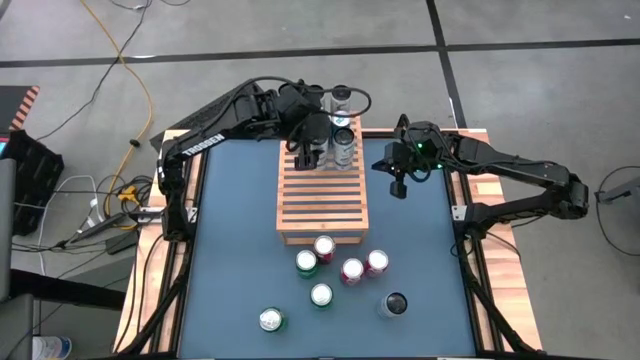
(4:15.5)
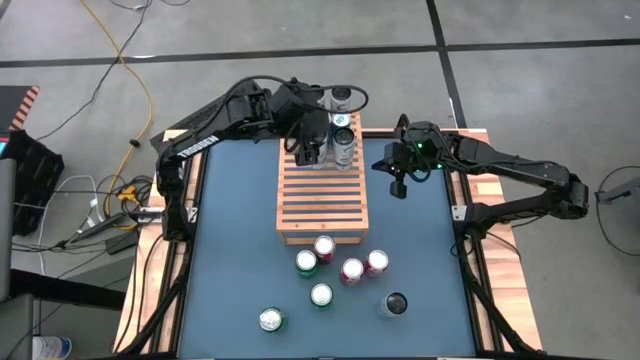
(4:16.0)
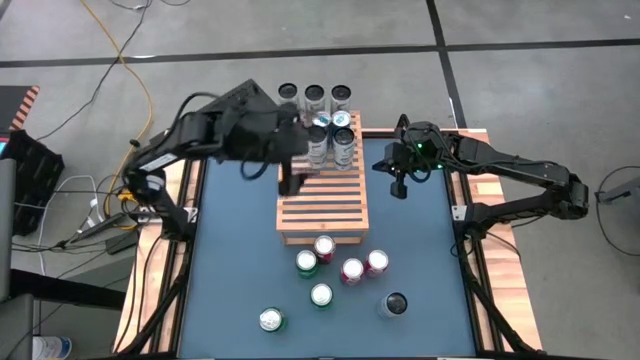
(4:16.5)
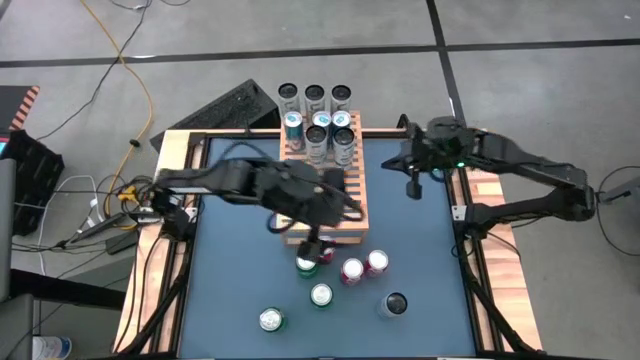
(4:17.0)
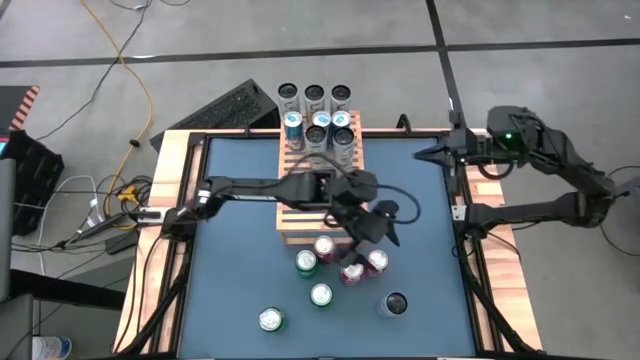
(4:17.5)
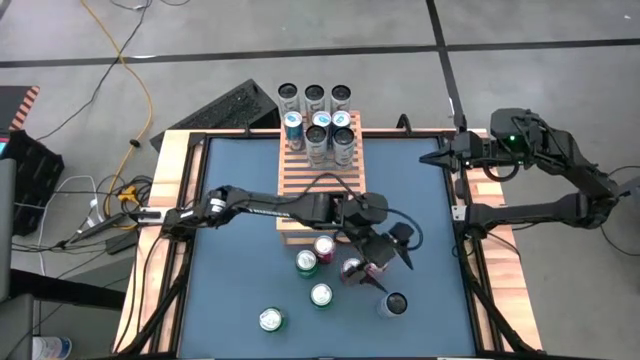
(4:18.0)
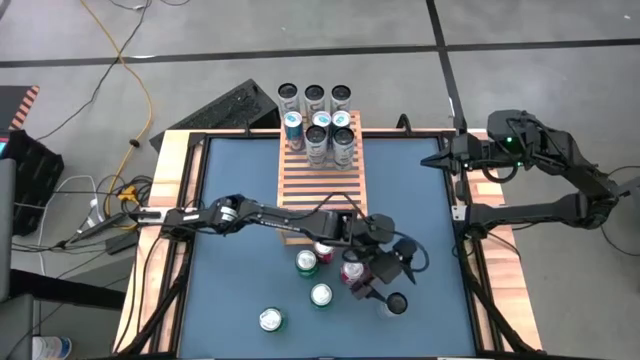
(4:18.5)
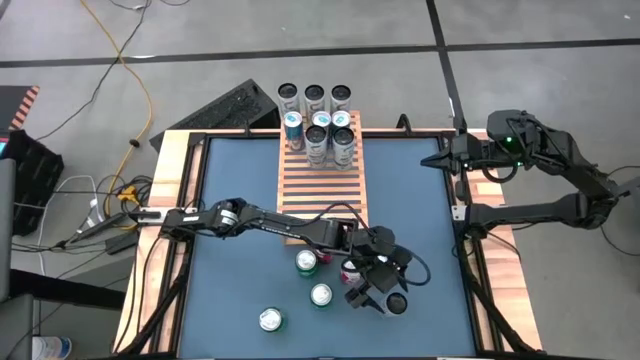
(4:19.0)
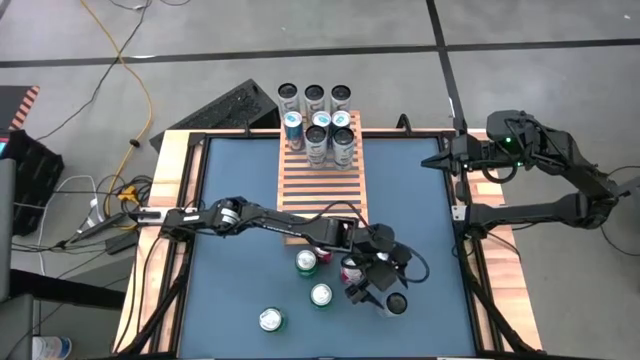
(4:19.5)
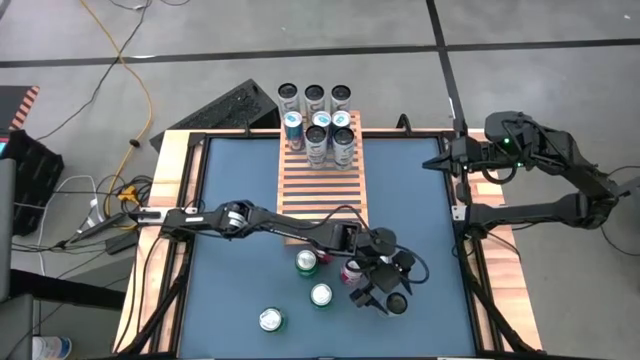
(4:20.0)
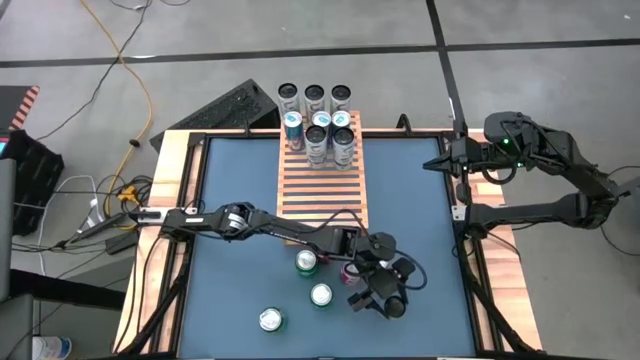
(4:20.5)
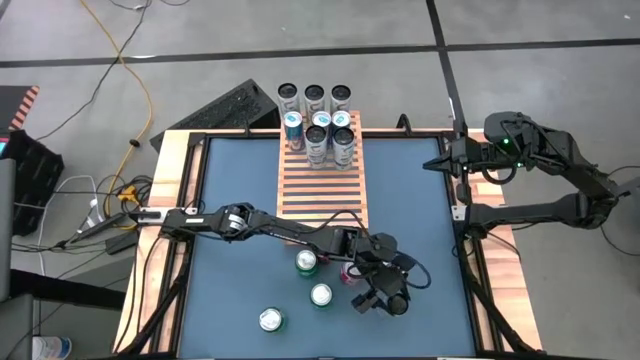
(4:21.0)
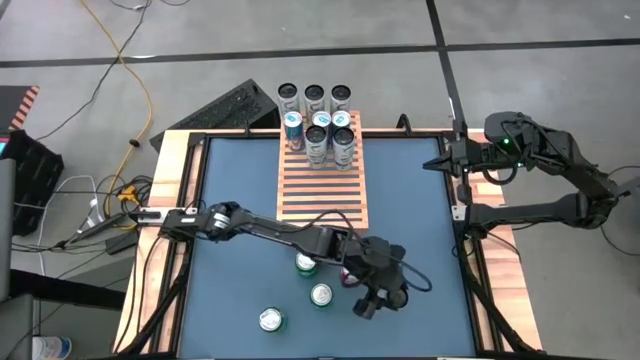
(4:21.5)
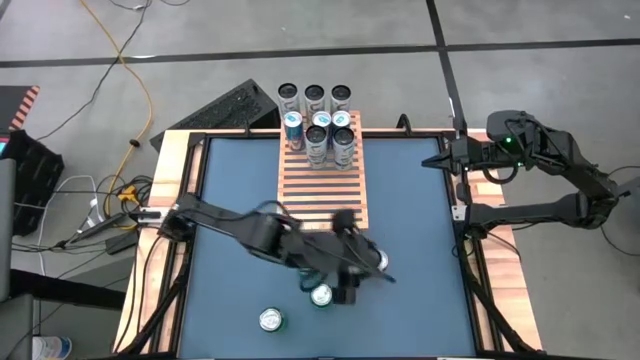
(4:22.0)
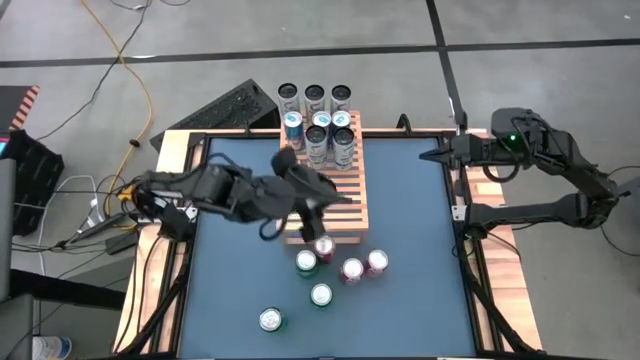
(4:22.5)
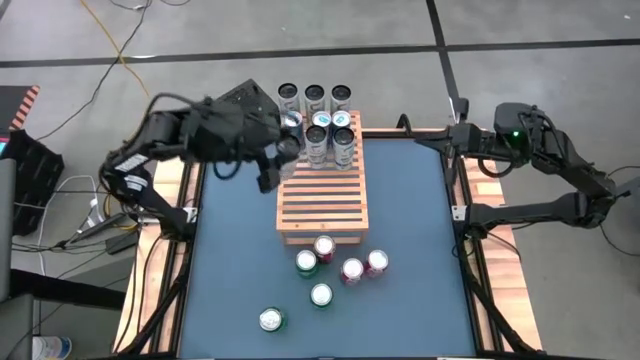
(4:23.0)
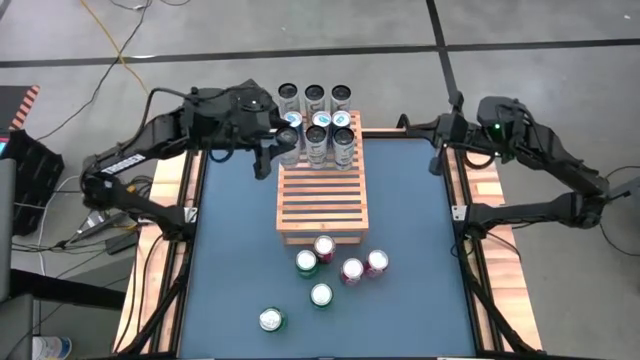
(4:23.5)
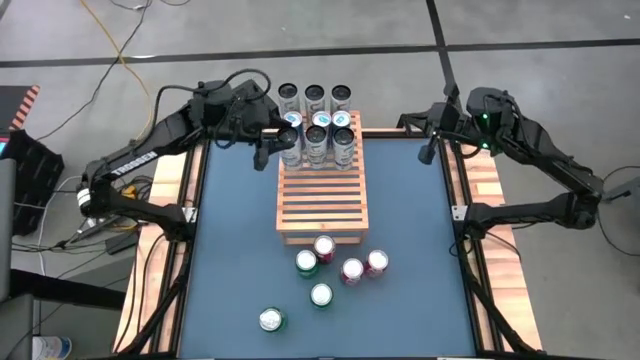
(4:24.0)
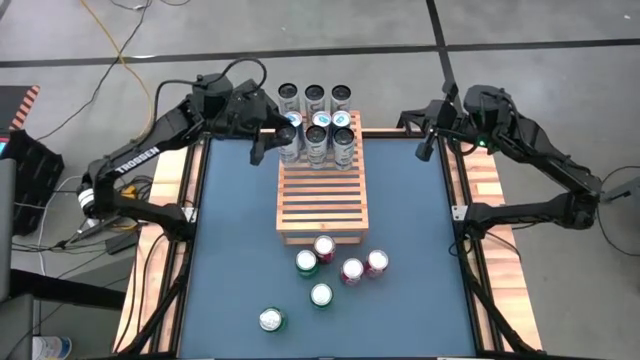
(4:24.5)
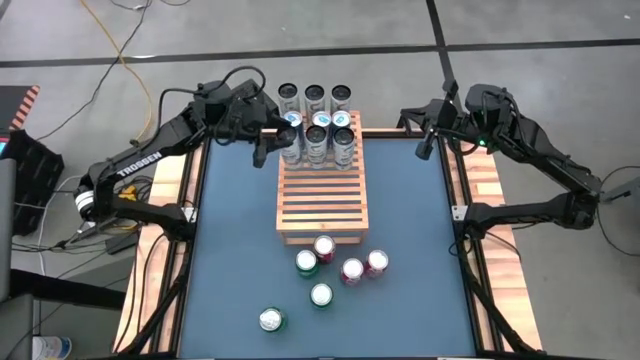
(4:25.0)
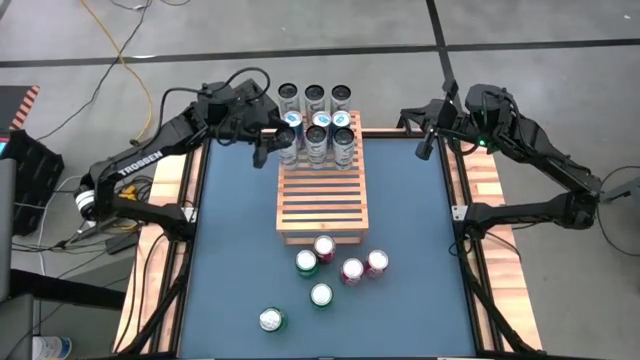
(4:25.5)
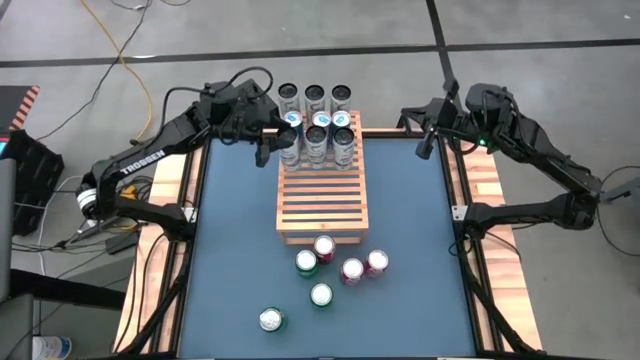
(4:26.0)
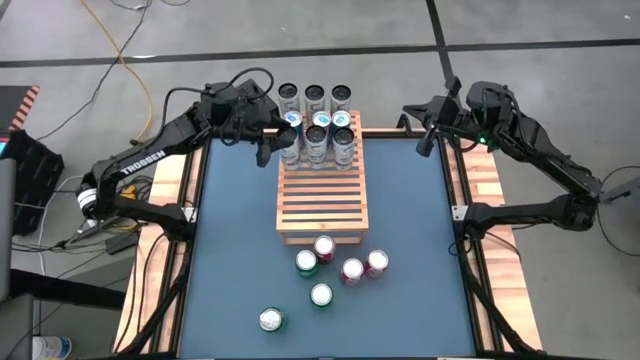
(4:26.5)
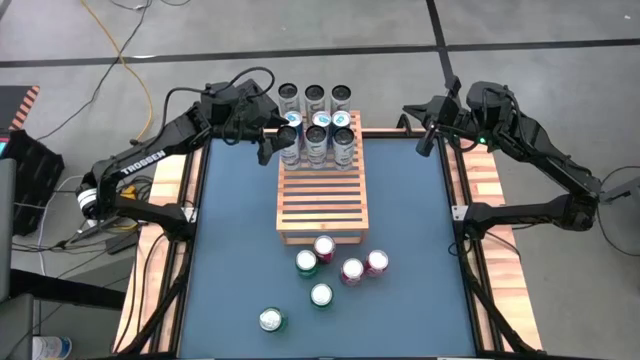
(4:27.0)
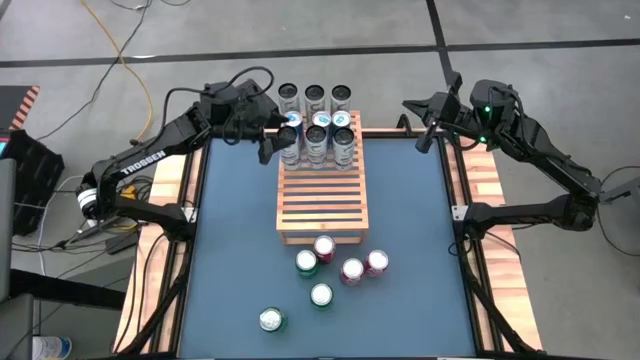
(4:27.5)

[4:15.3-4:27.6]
Task: Place canned beverage on shelf
Put the white blue soda can on the shelf aligned with the other white blue soda cans

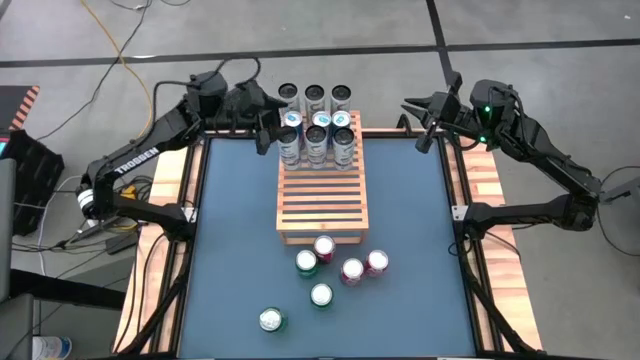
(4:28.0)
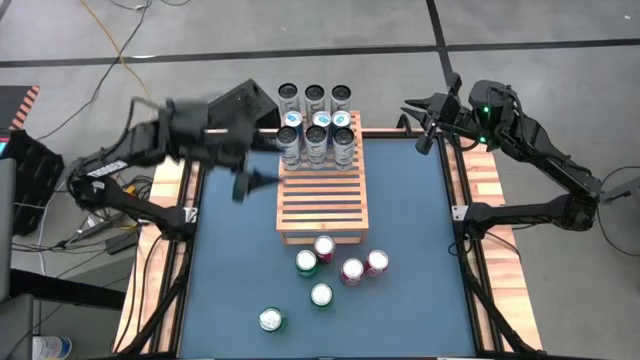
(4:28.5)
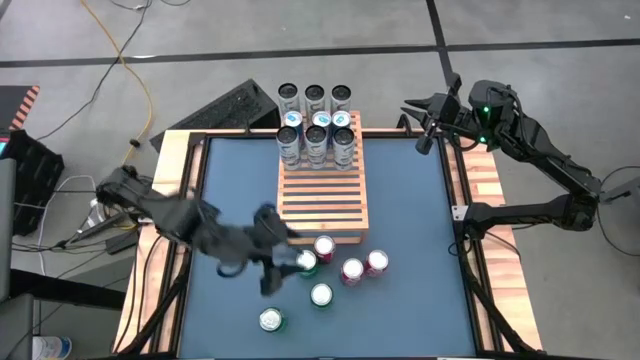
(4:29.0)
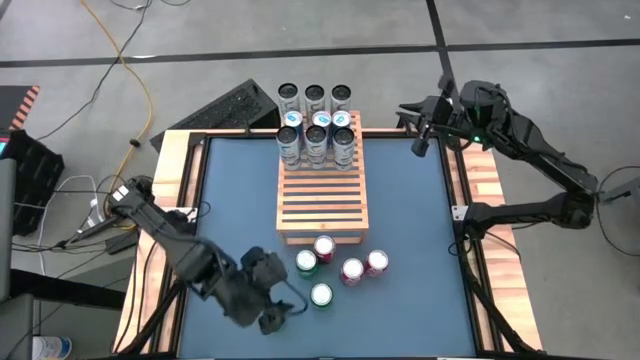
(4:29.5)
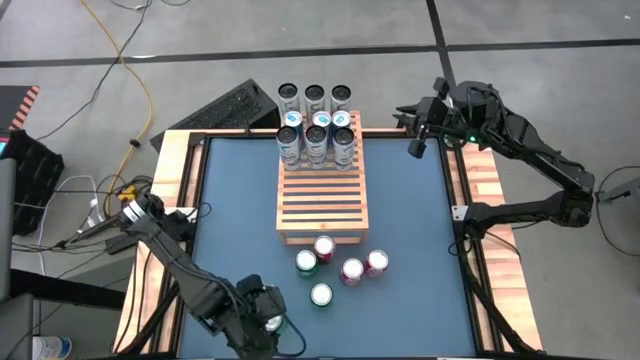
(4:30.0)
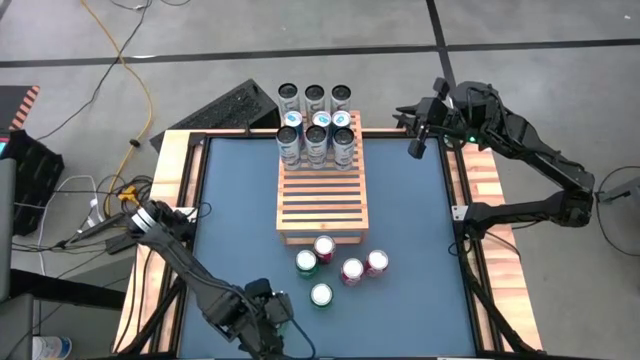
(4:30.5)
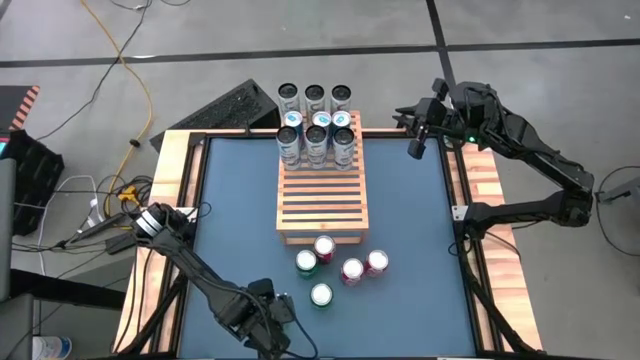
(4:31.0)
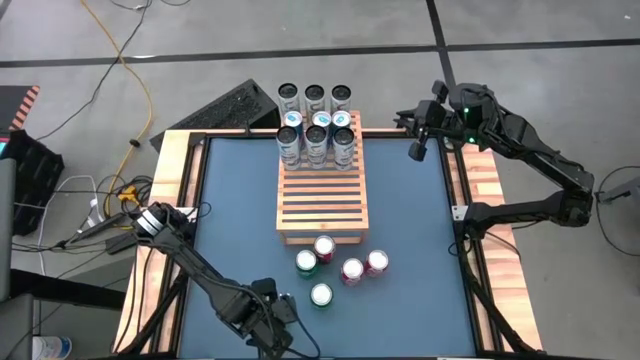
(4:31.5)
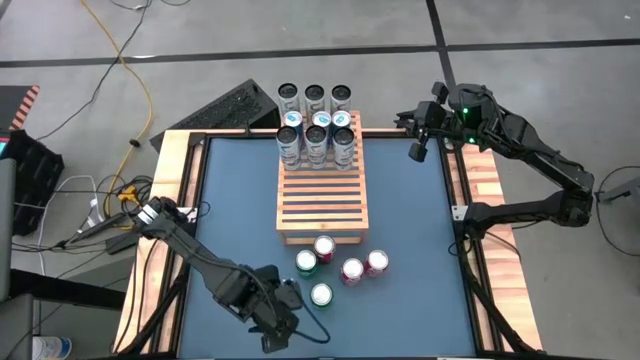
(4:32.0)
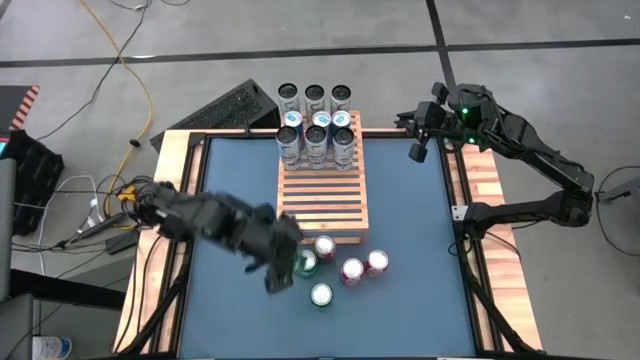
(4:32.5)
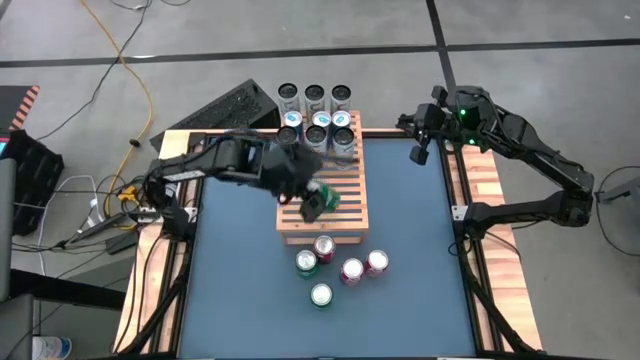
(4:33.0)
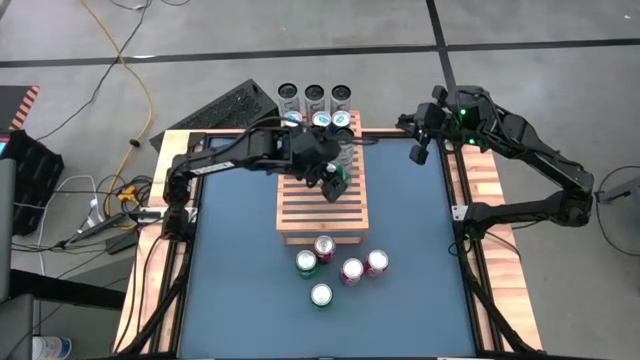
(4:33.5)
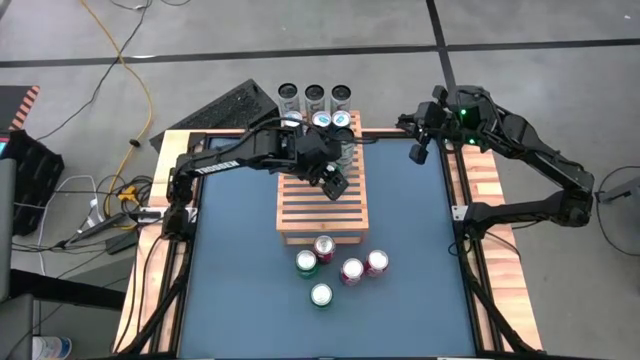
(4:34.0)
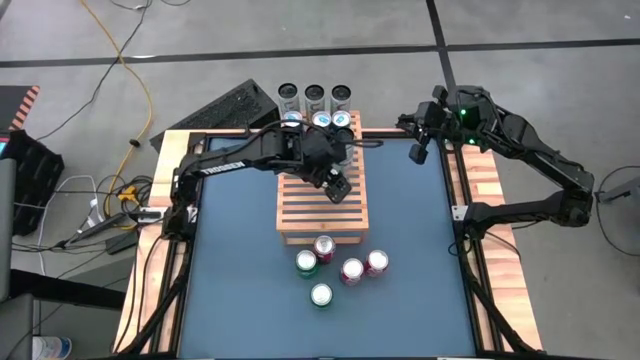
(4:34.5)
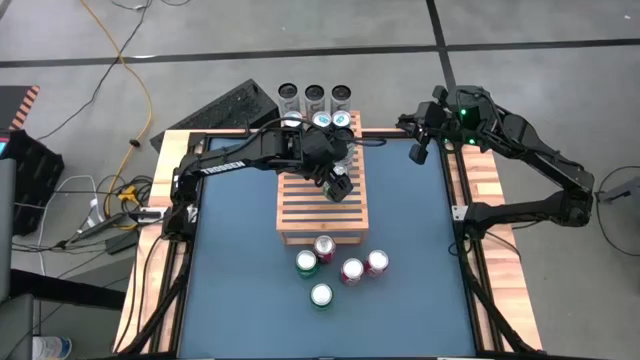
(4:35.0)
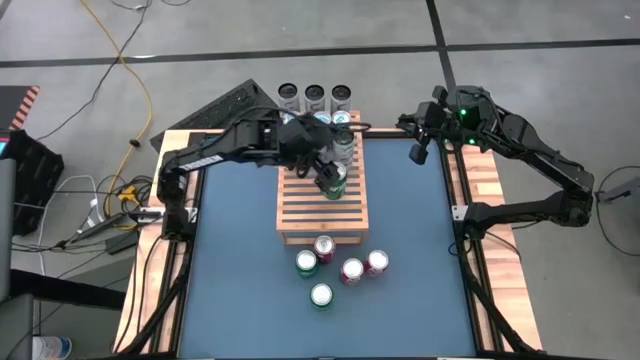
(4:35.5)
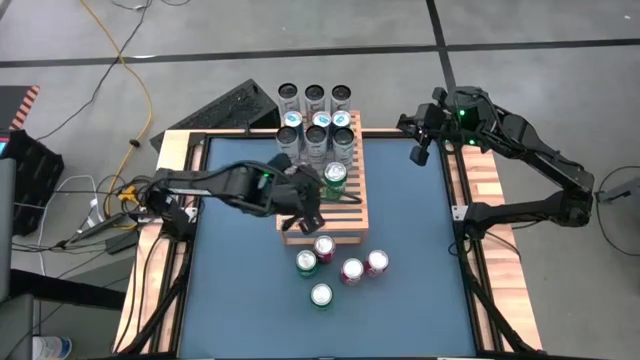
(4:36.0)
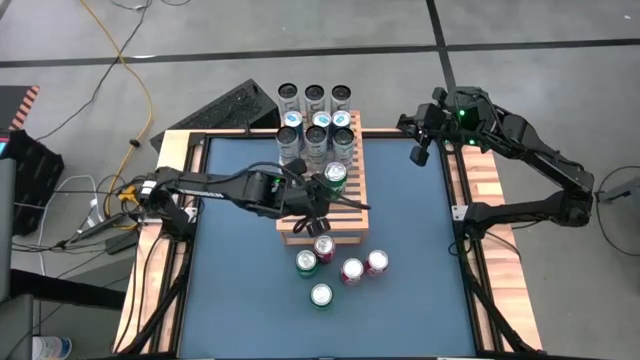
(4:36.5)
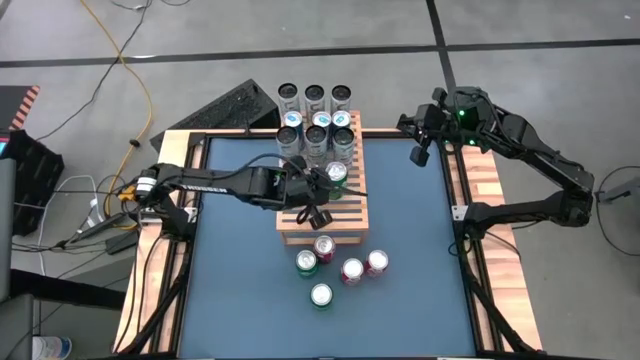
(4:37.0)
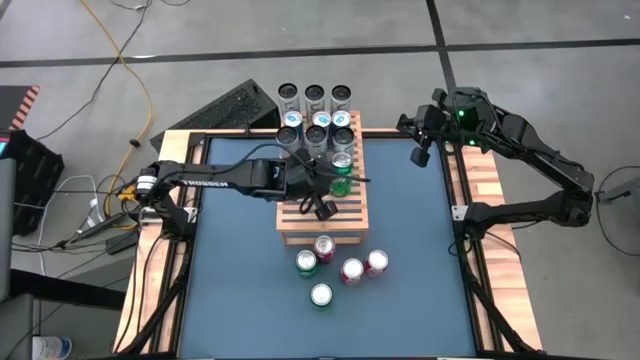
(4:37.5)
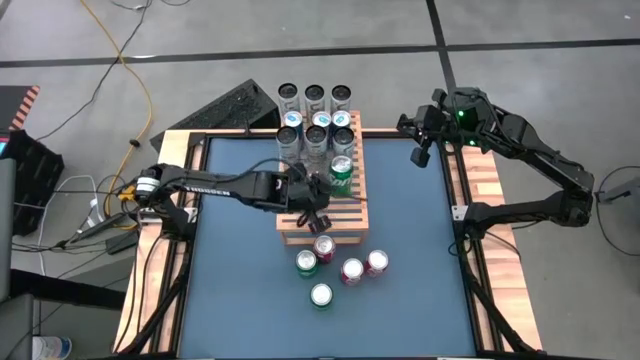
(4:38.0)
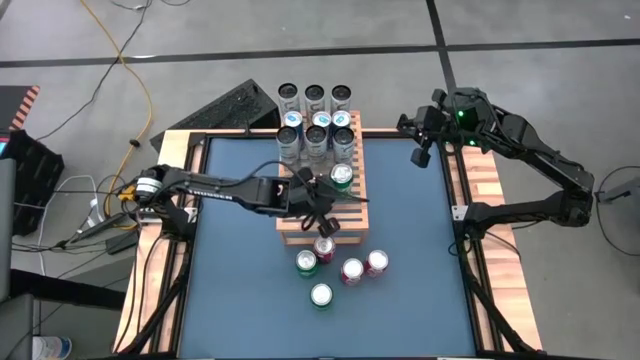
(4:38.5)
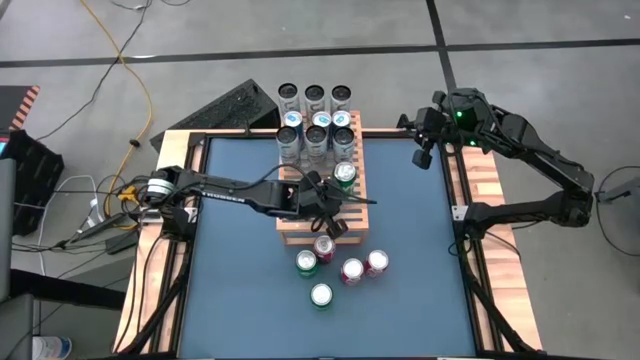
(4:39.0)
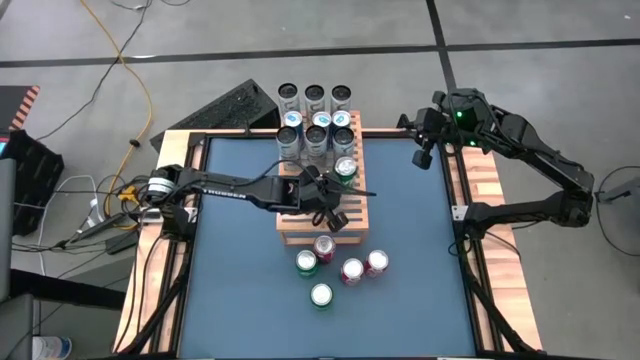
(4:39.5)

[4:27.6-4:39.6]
Put the bottom left green soda can on the shelf
